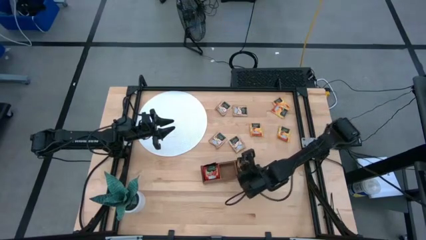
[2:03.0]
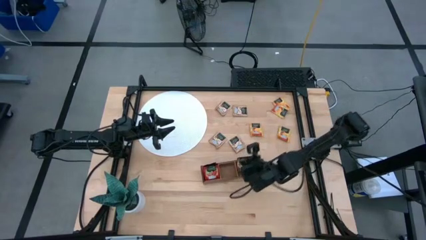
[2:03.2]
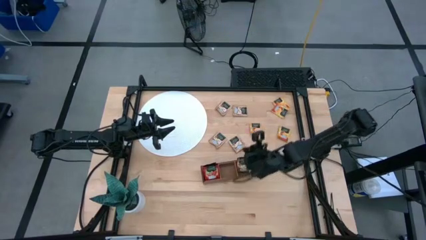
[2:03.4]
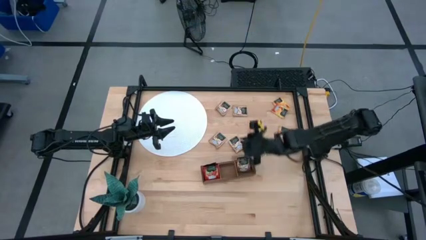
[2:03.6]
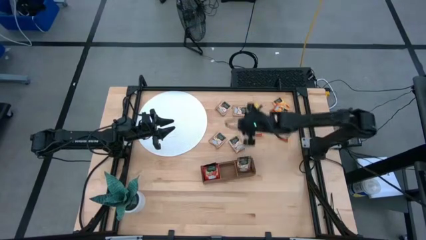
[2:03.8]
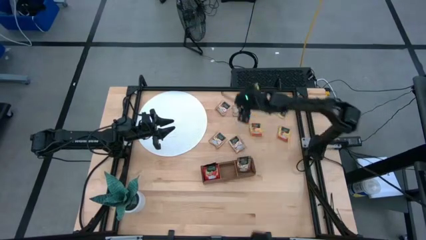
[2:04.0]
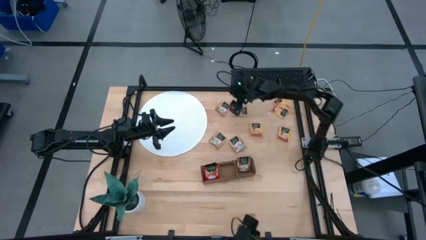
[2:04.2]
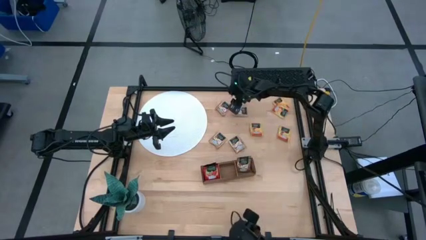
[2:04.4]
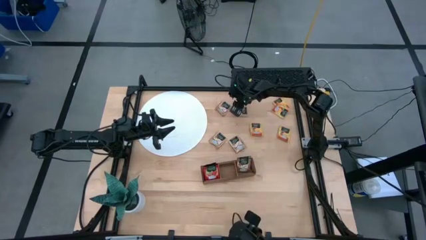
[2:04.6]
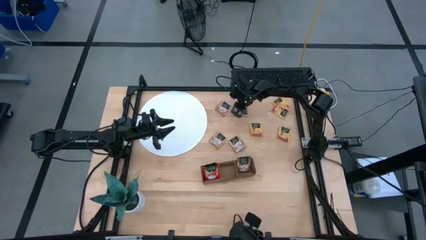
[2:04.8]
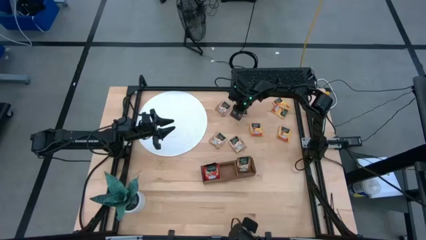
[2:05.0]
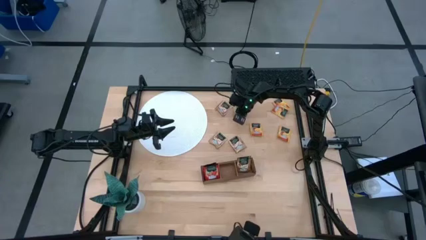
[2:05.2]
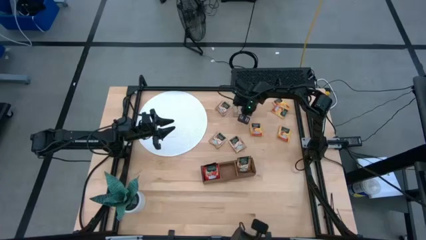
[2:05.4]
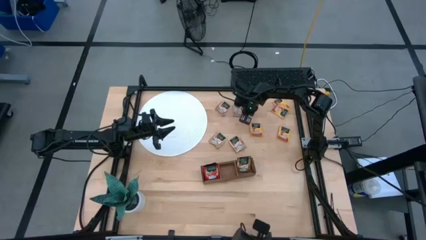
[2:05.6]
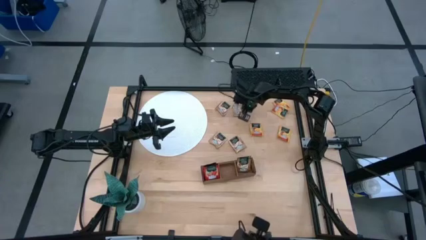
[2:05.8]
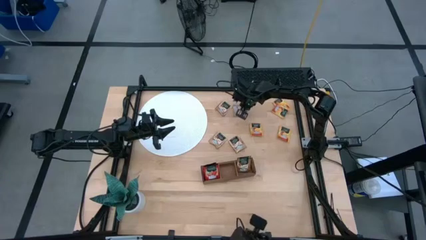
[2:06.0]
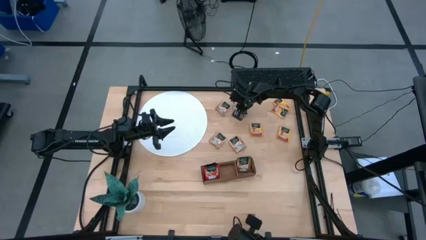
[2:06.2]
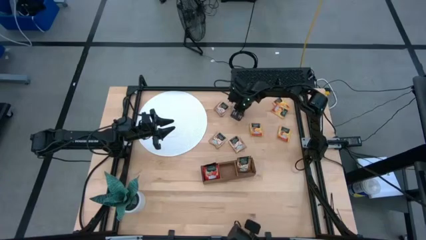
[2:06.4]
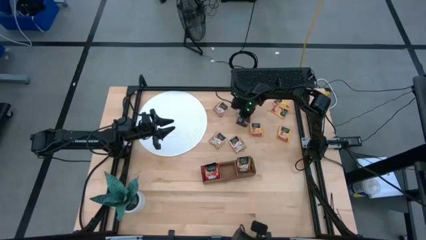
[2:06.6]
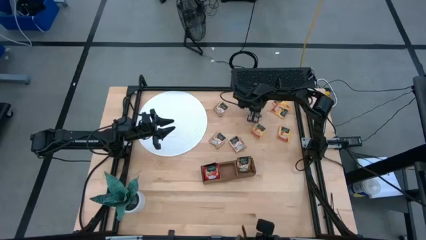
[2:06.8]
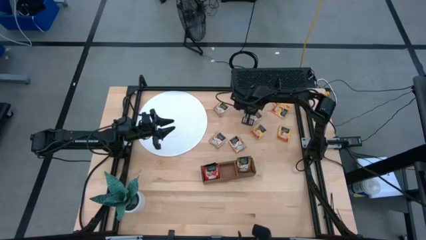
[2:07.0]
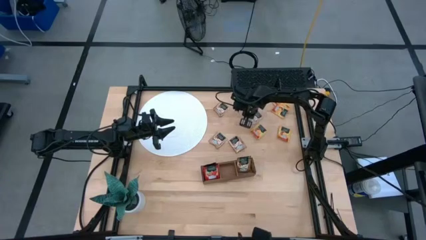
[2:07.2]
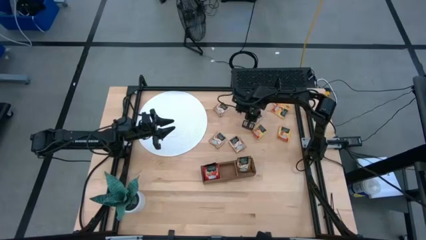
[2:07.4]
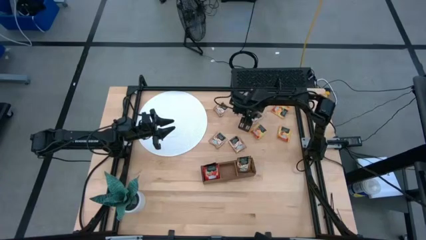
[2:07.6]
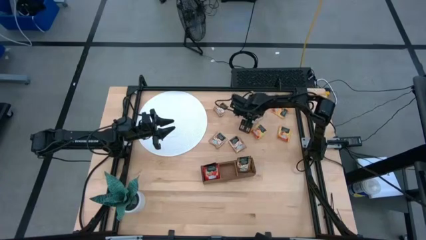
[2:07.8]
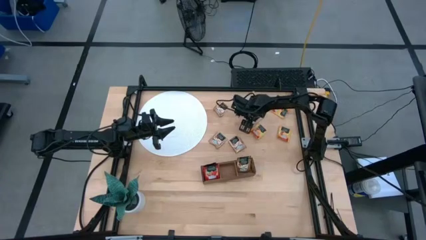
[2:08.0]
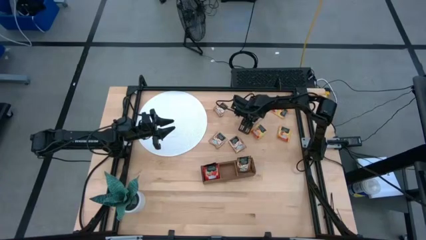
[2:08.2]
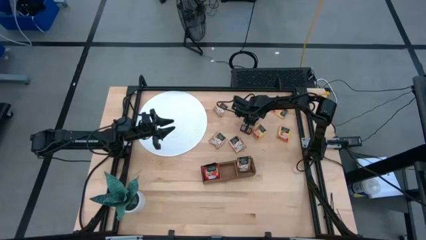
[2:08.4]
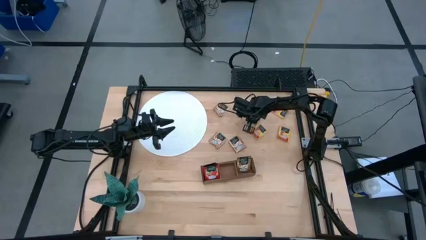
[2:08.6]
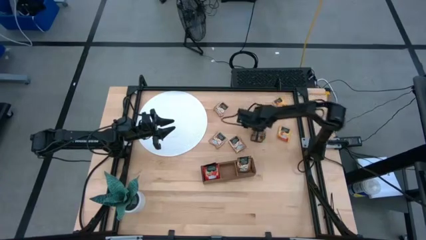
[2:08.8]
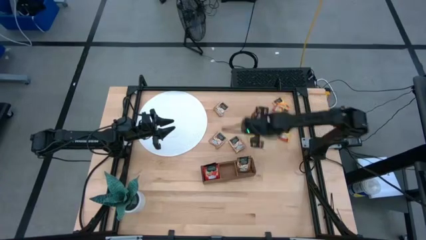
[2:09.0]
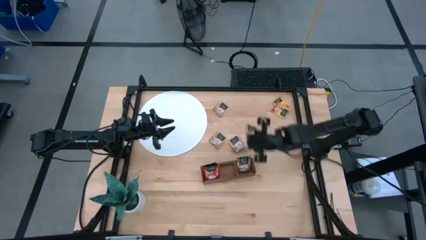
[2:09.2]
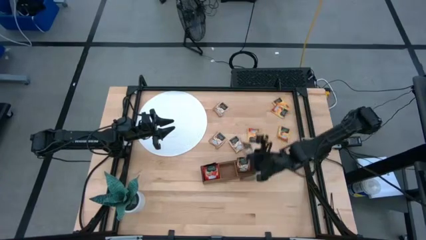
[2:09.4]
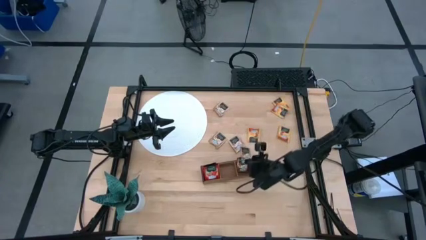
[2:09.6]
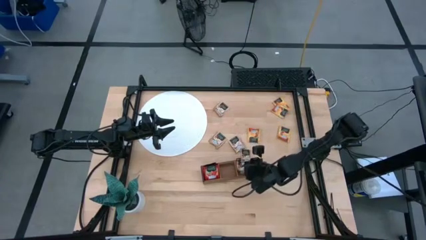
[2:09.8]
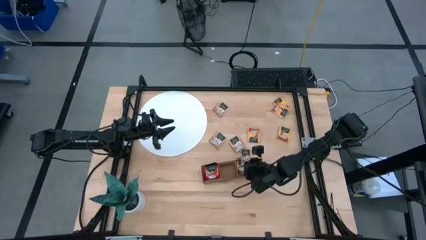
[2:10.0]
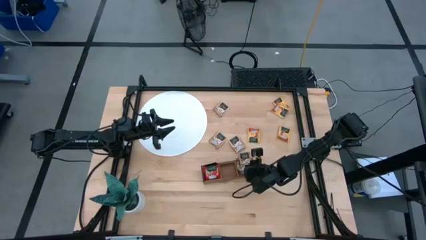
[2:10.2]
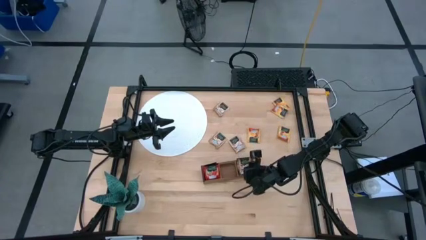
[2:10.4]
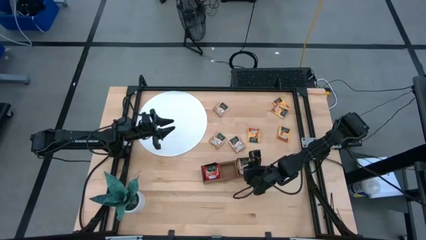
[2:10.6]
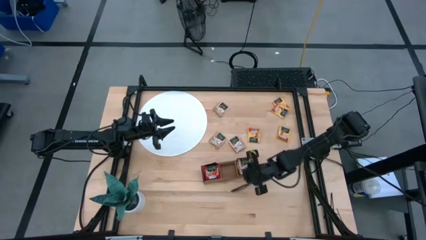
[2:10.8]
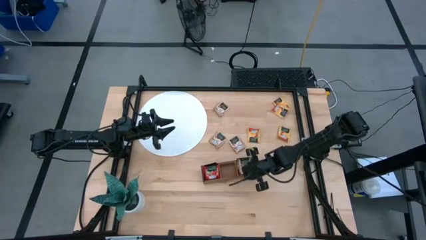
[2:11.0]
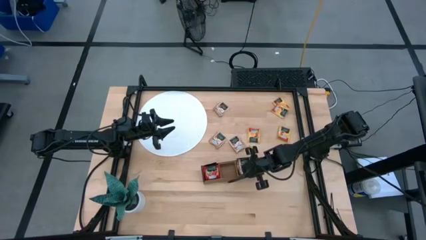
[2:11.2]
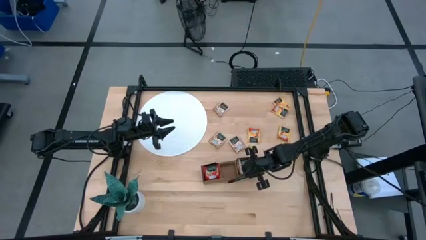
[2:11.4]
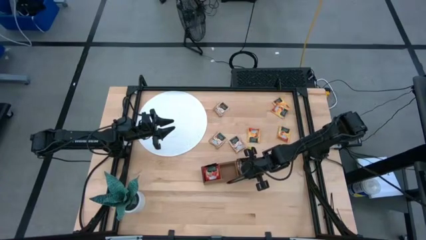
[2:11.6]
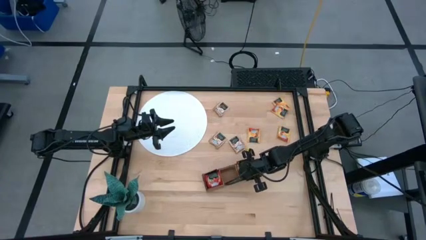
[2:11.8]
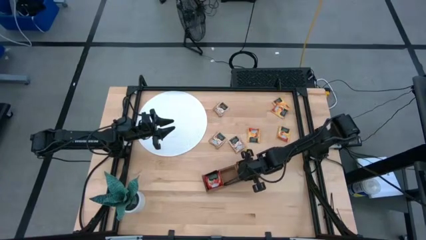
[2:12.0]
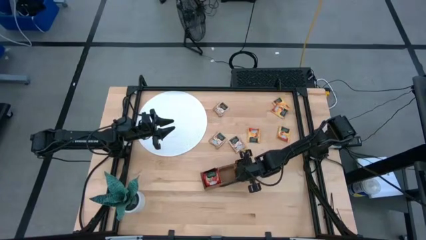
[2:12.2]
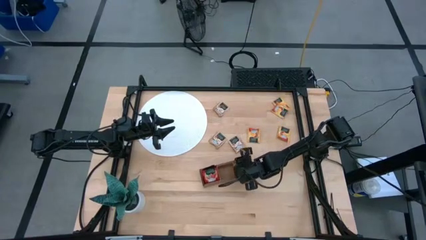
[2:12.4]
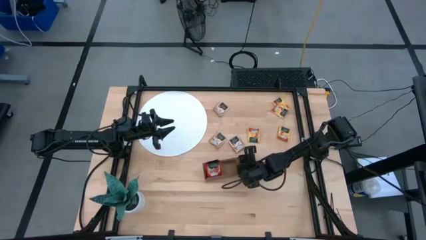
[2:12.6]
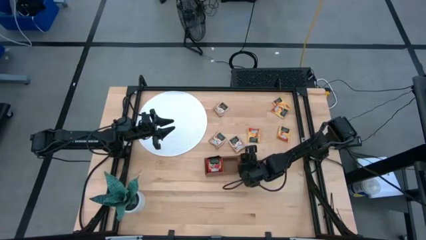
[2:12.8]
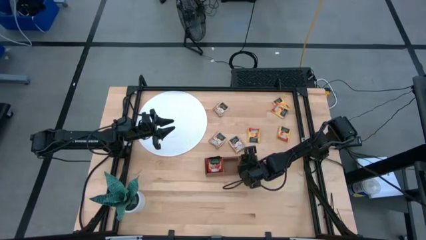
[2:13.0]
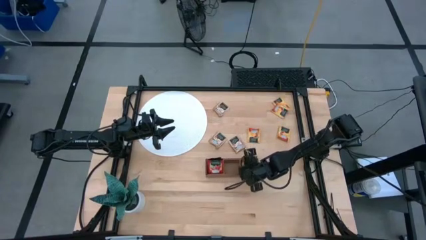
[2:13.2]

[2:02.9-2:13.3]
Task: Pick & Place Tea
Put the brown tea bag into the right section of the wooden organizer

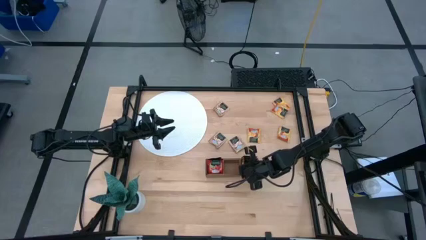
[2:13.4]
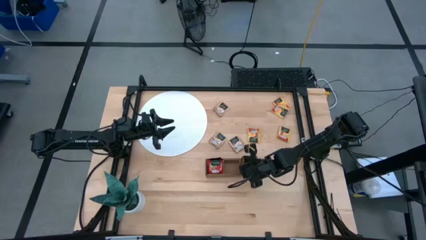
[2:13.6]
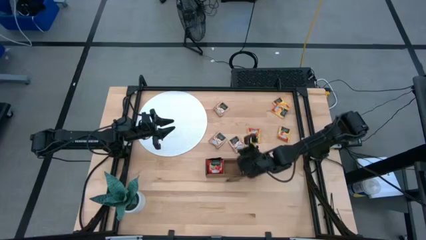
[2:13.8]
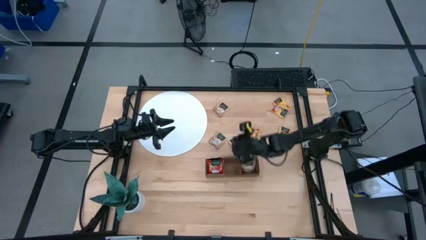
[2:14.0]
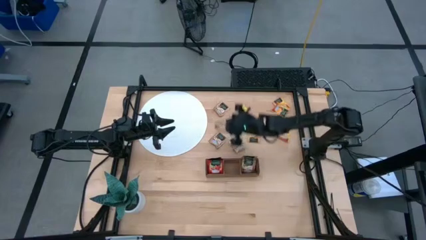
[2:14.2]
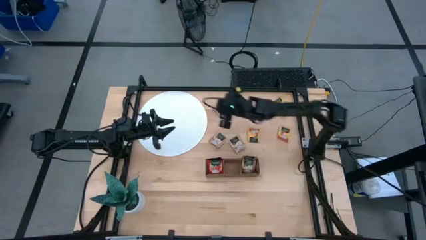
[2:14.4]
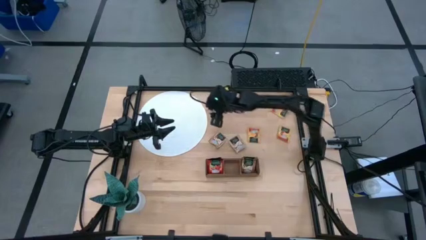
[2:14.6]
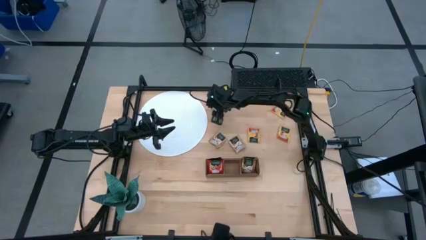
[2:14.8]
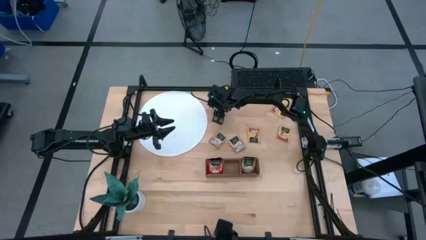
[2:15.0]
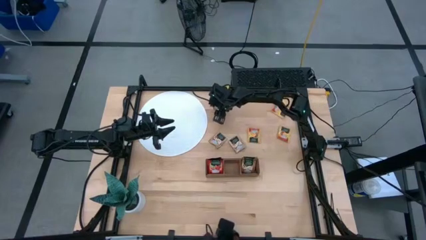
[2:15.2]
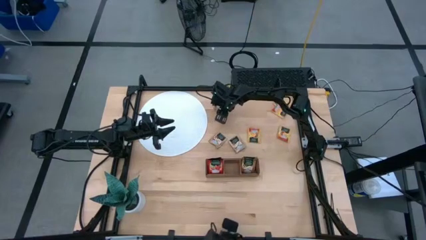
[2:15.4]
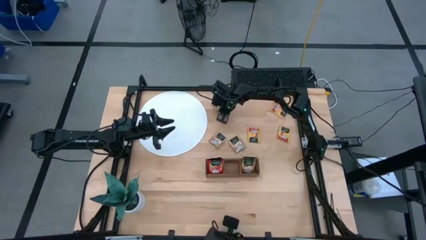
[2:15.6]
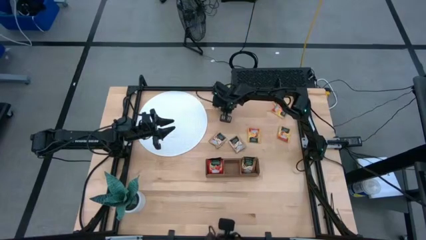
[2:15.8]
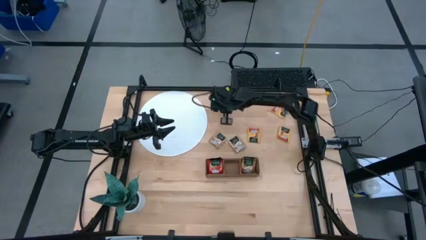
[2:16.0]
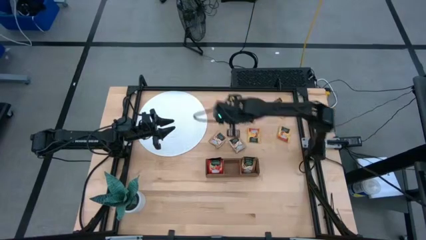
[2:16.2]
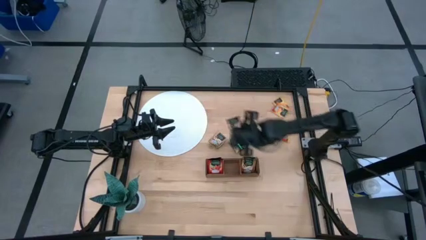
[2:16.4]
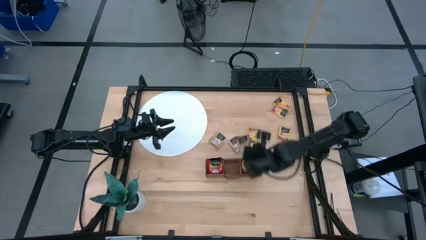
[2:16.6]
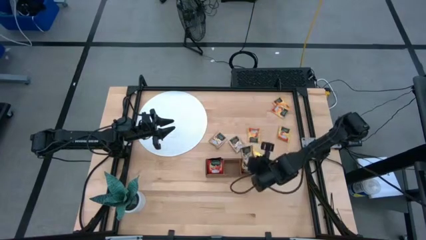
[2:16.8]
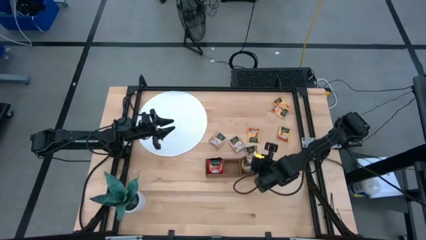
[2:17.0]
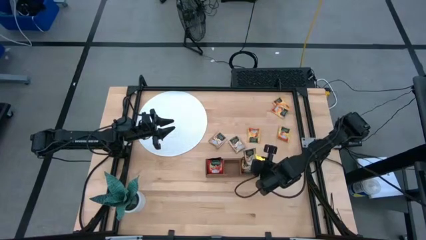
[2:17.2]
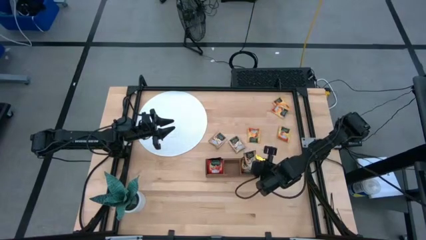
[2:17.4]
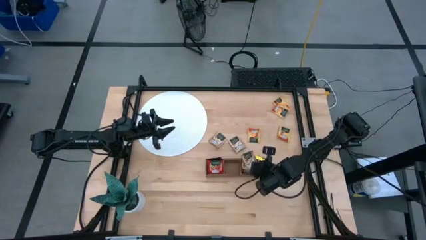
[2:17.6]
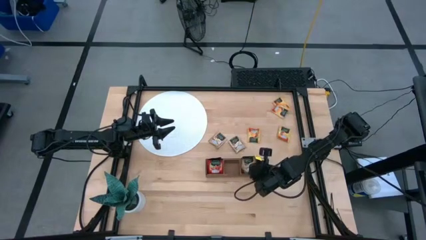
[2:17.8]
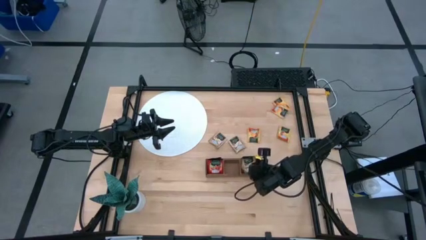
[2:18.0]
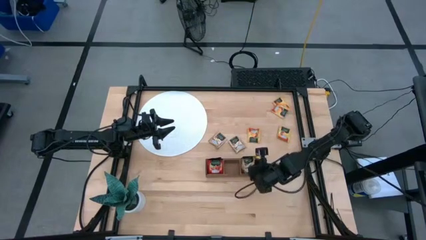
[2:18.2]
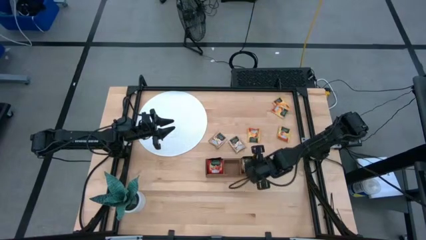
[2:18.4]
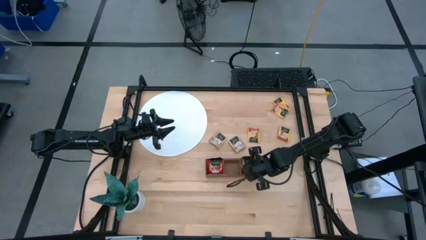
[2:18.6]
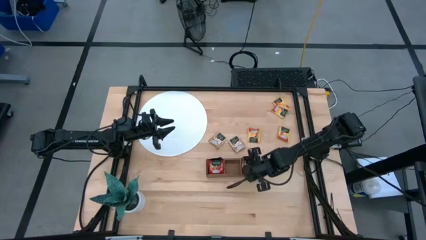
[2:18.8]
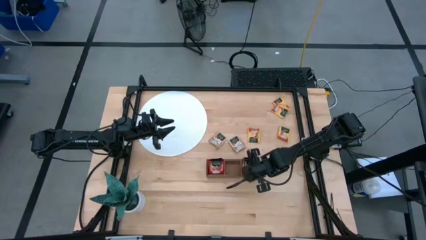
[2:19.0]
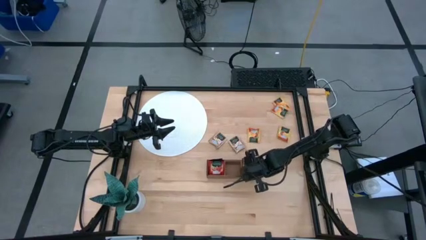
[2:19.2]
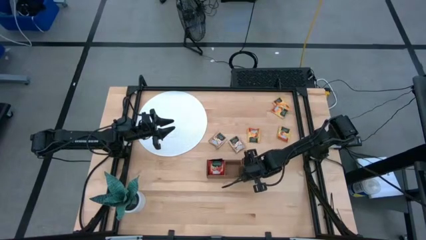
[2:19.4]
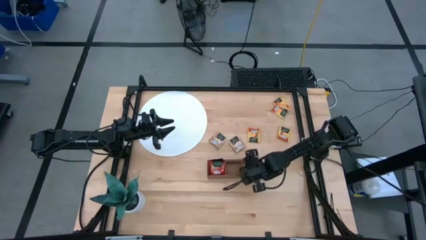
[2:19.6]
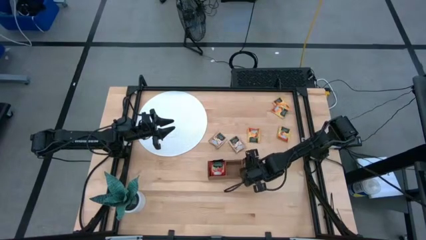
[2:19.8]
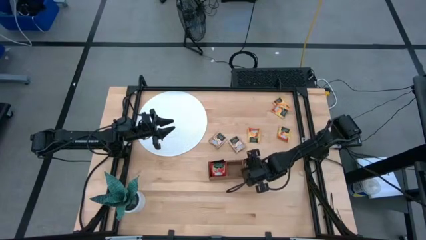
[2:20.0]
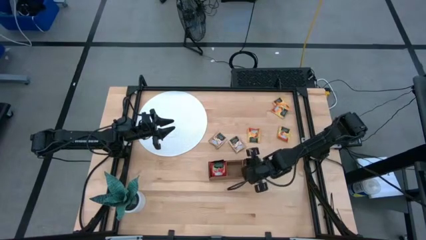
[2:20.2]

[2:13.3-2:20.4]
Put the brown tea bag into the right section of the wooden organizer
